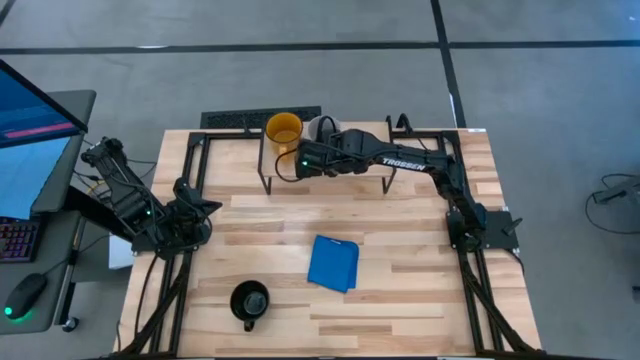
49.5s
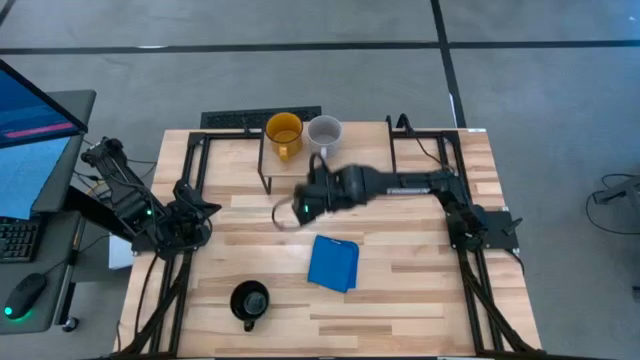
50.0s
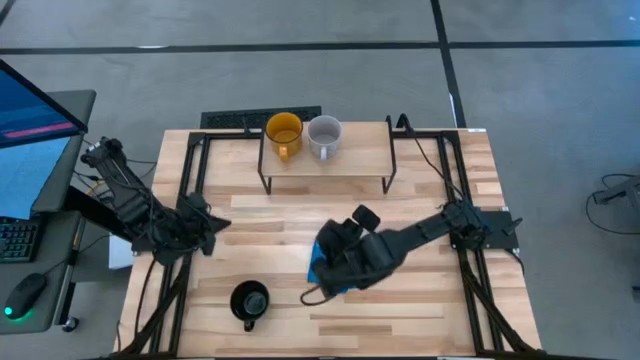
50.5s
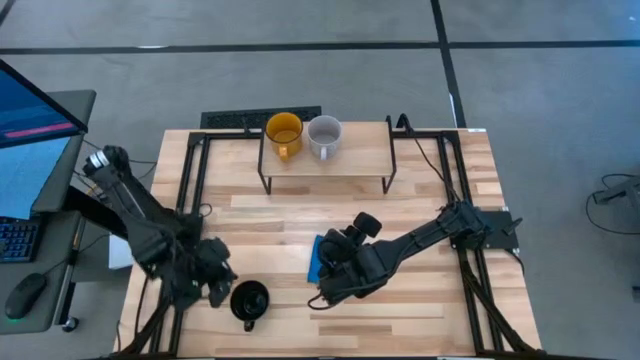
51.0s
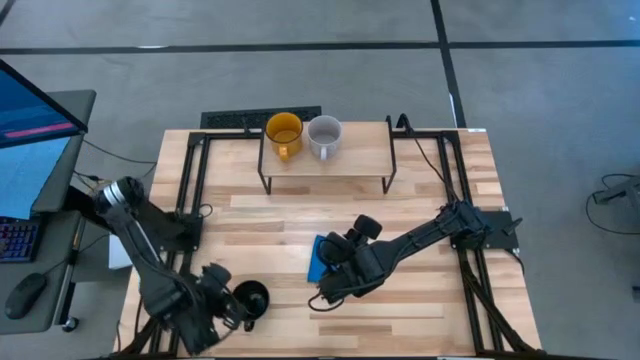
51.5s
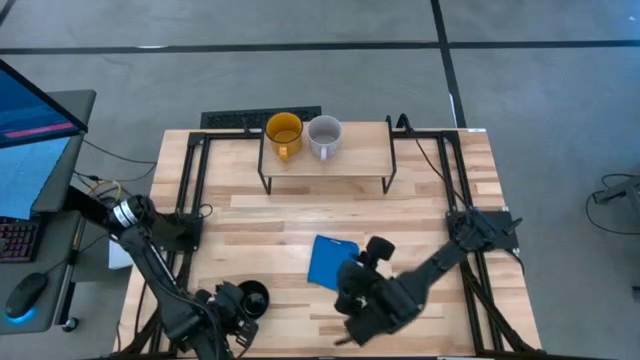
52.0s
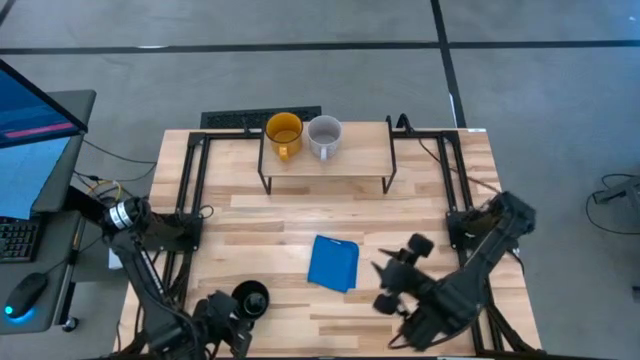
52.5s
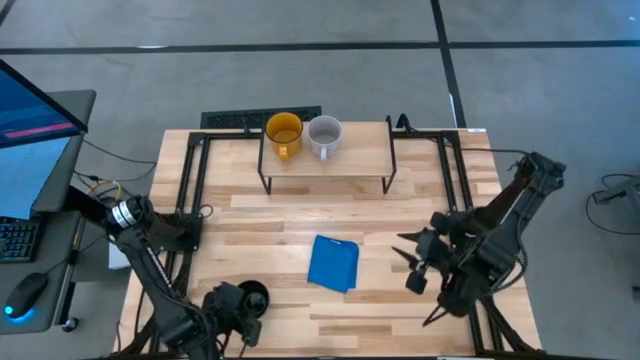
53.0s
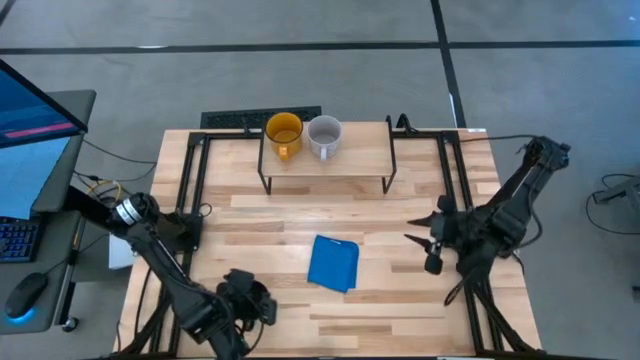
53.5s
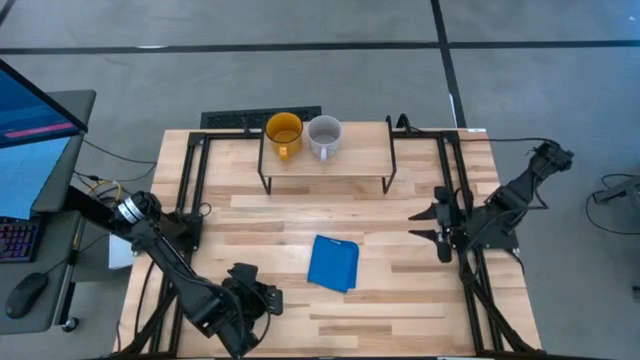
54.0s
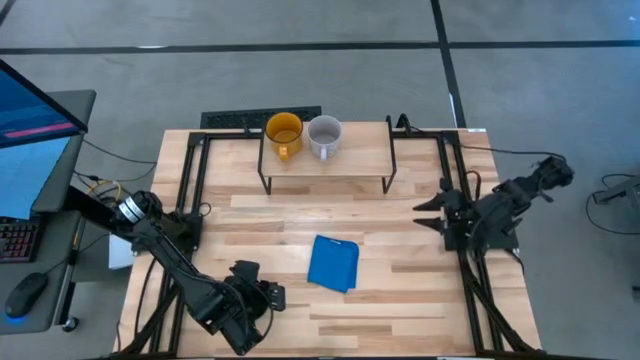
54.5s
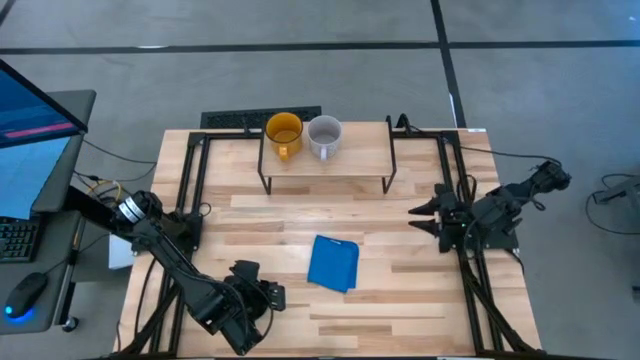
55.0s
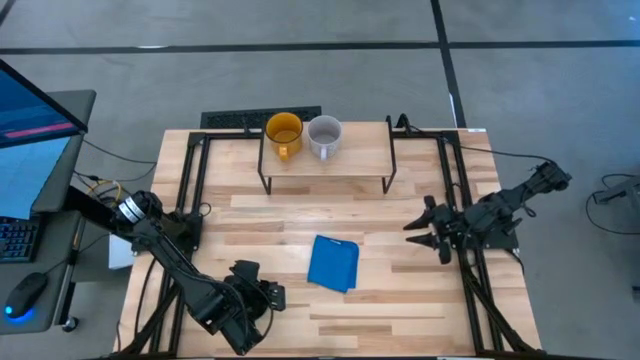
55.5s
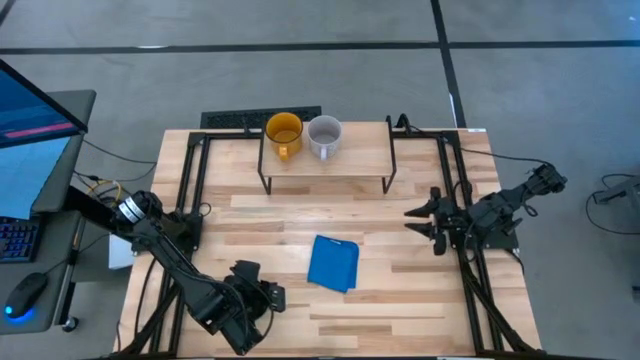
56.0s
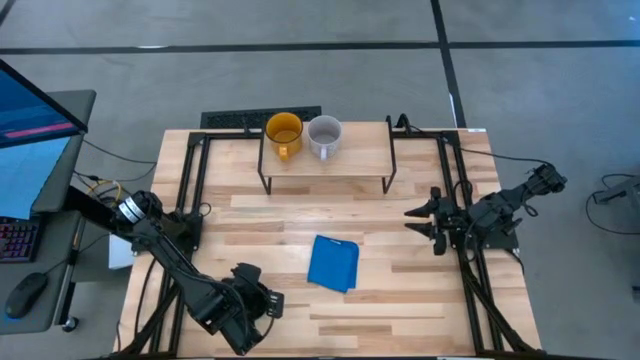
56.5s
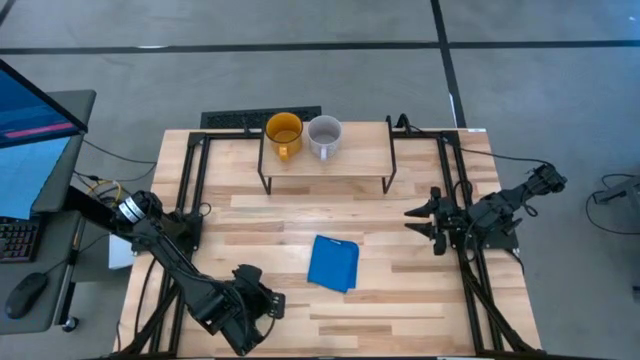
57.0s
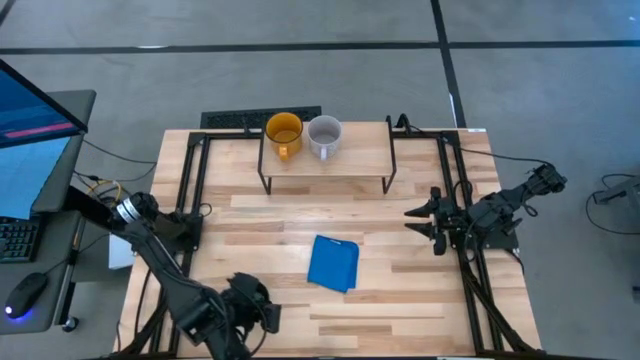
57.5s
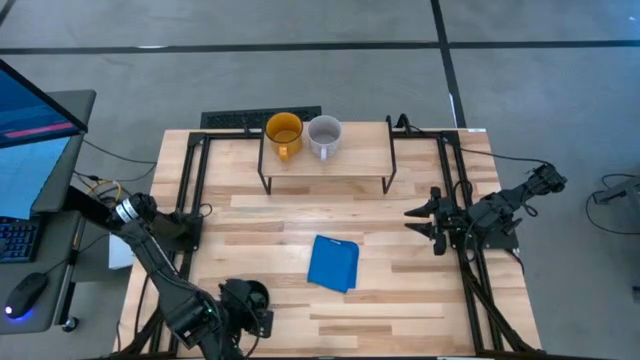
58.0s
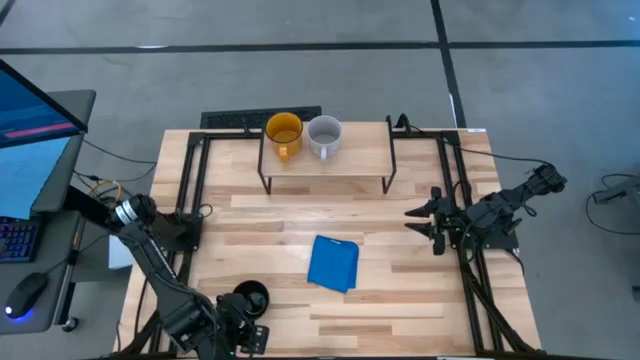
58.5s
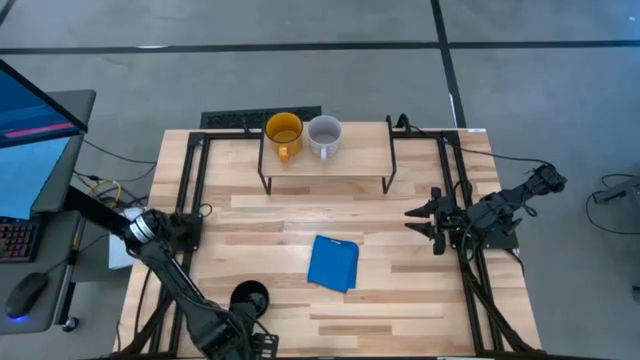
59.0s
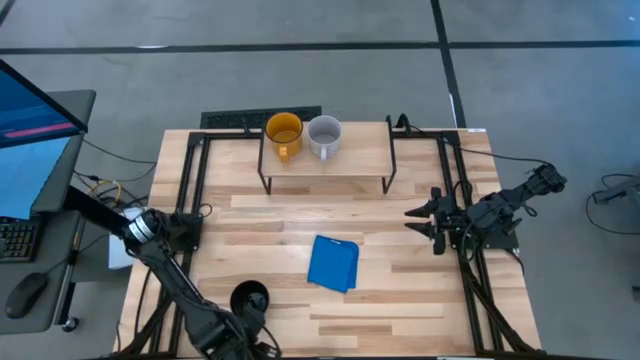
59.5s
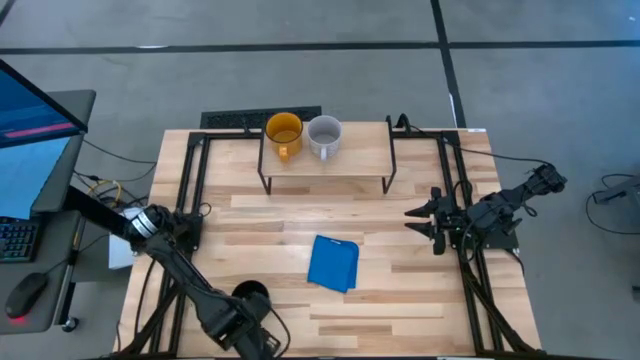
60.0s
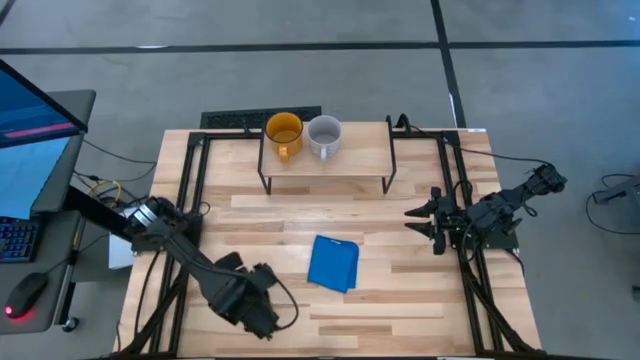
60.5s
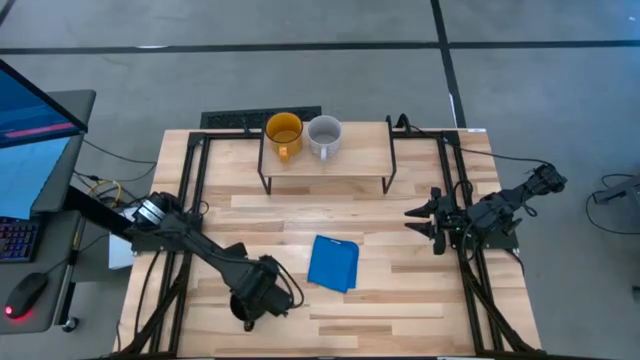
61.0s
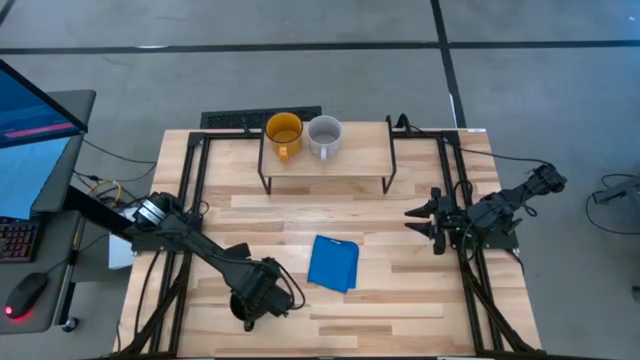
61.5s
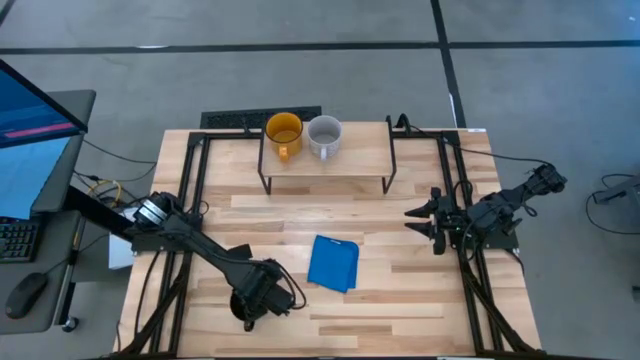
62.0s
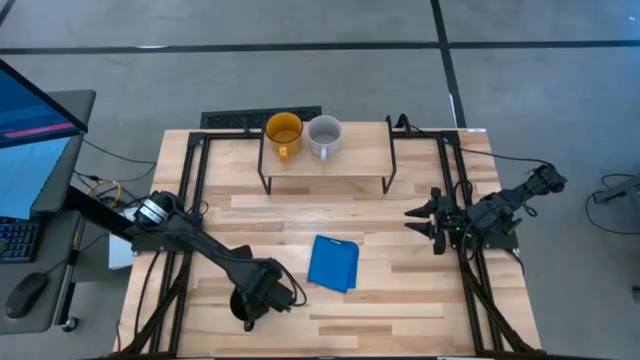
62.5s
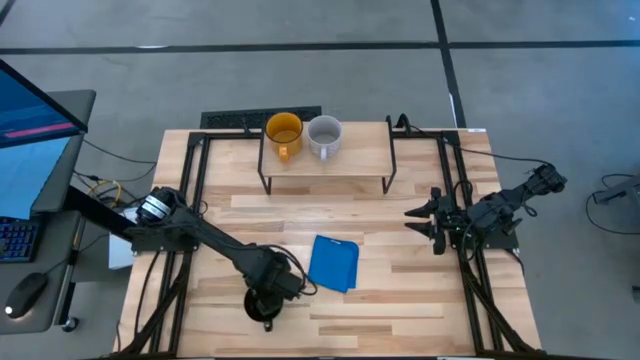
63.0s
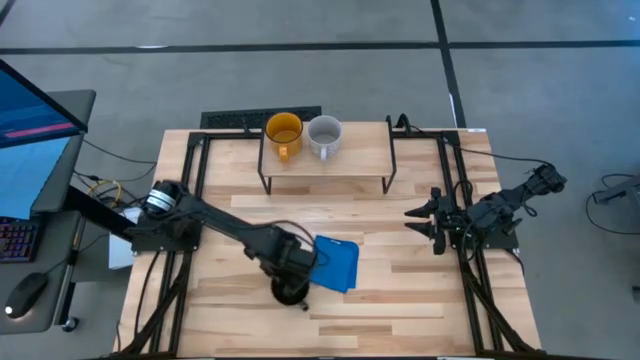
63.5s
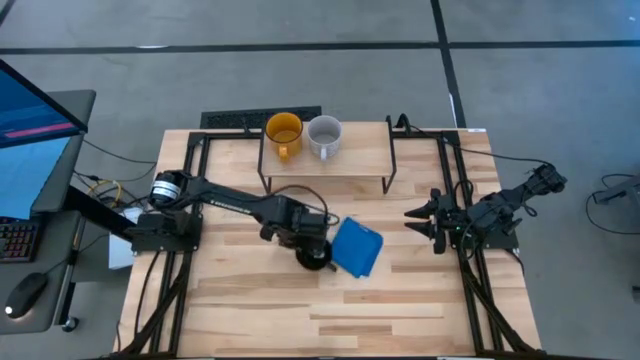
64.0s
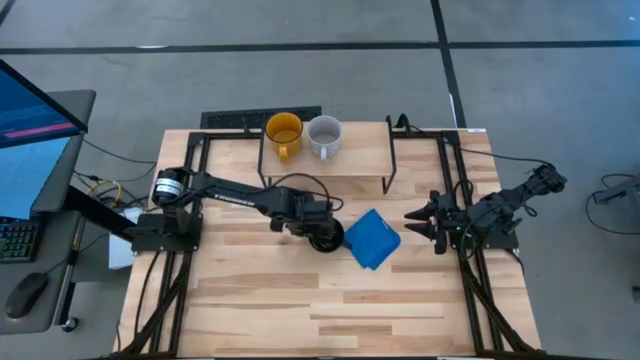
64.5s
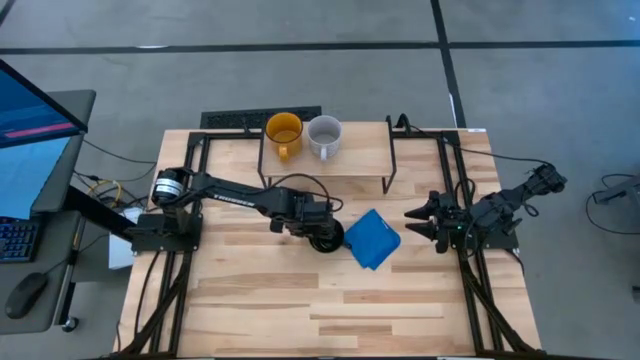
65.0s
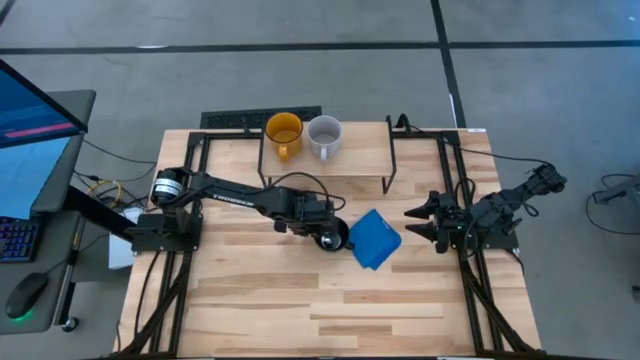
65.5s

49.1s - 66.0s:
Task: Stack small to large cups/mugs on shelf
Put the black mug on the shelf

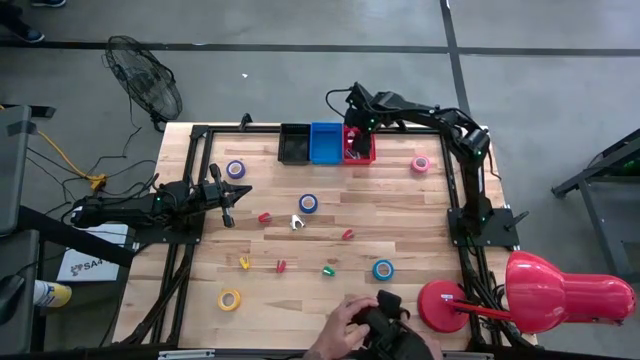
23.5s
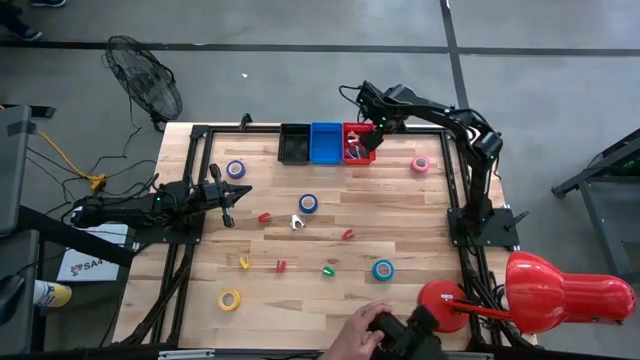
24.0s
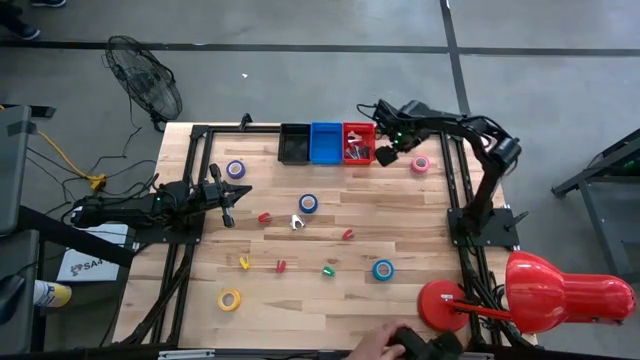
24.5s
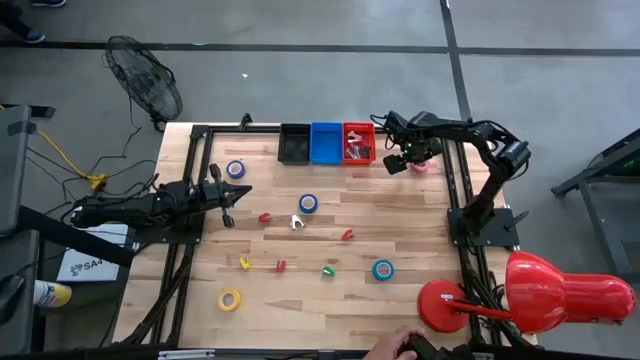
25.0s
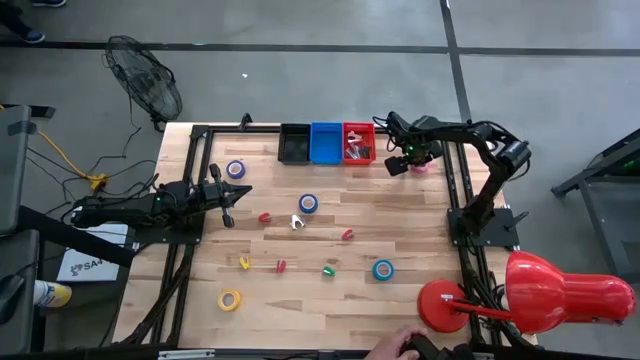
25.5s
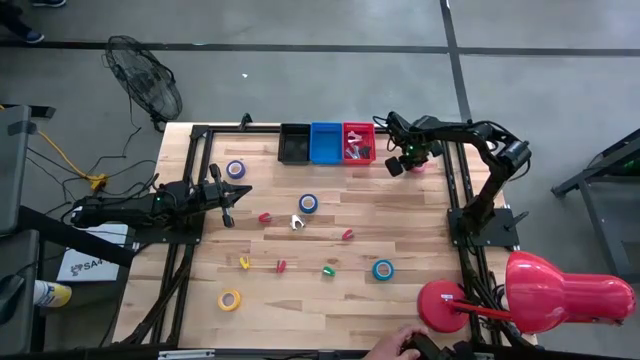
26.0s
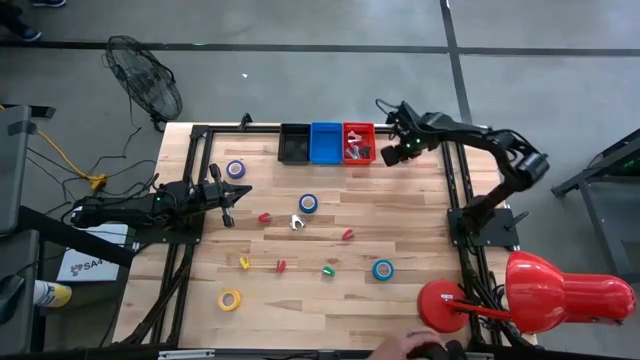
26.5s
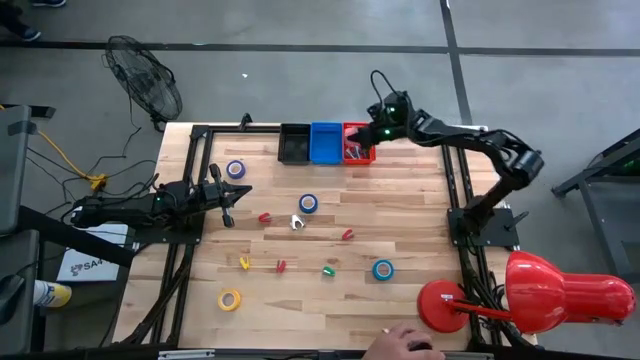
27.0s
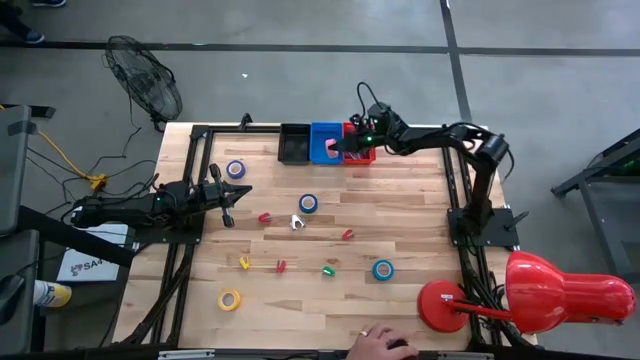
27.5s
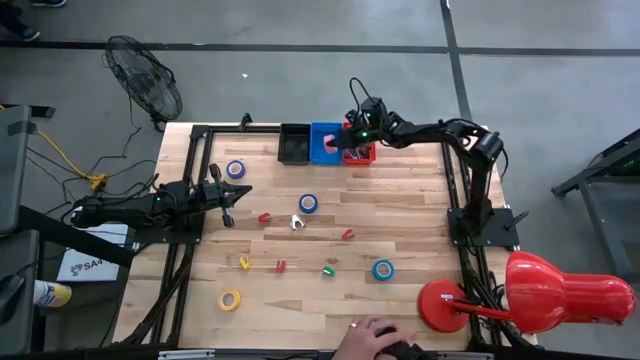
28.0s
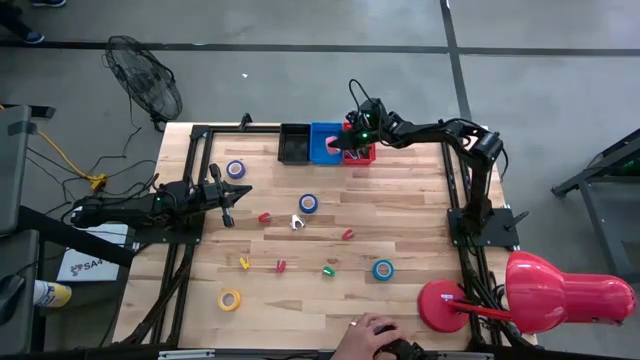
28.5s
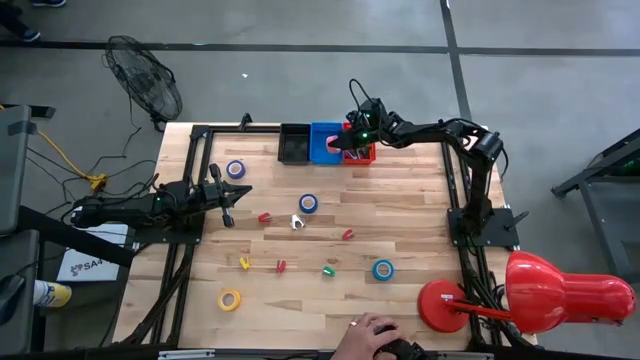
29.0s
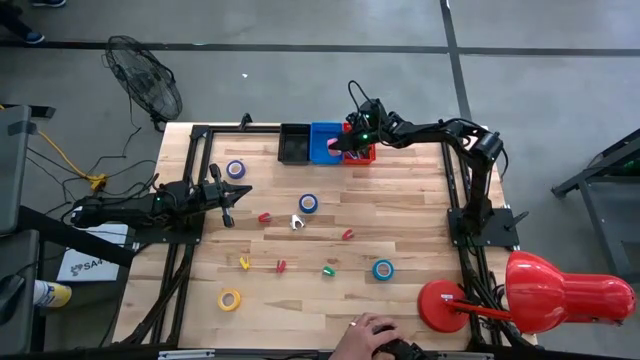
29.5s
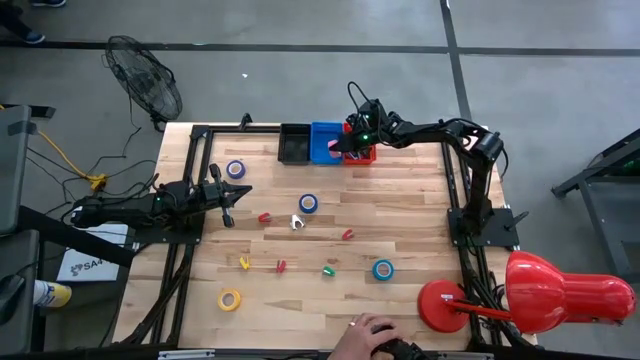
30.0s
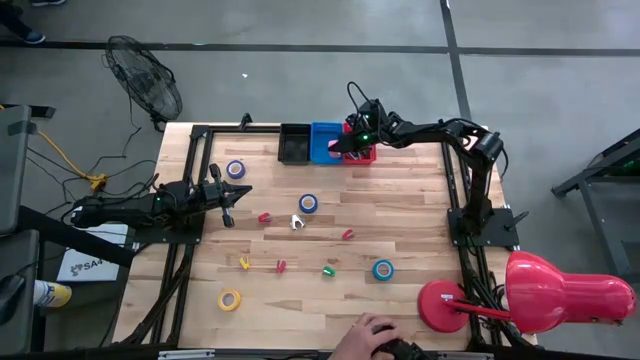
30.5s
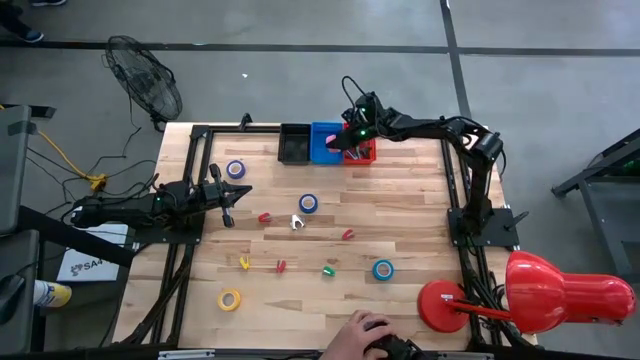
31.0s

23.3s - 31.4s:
Task: Pick and place Stapler, Stapler remover, tape
Put the pink tape into the blue bin
